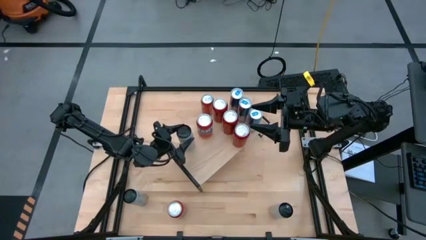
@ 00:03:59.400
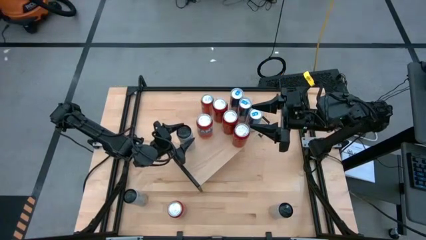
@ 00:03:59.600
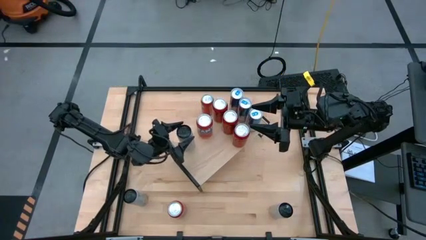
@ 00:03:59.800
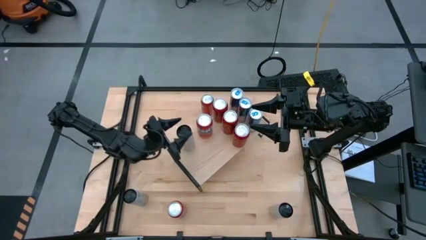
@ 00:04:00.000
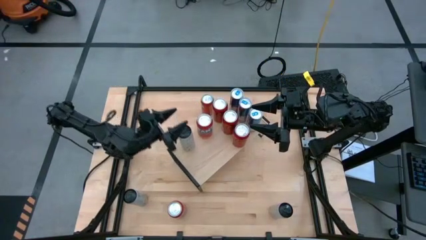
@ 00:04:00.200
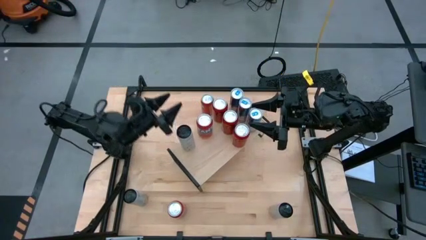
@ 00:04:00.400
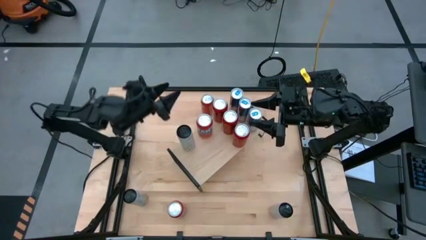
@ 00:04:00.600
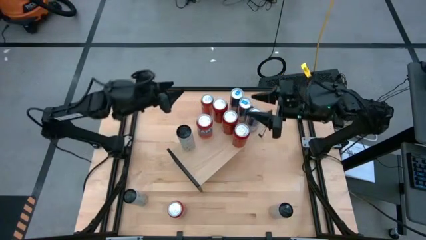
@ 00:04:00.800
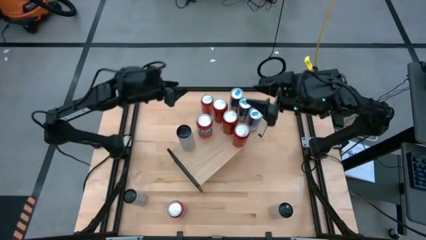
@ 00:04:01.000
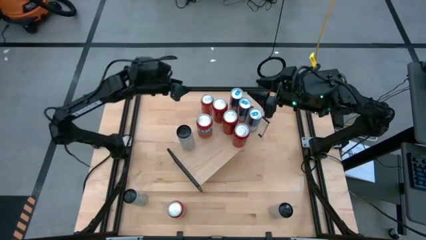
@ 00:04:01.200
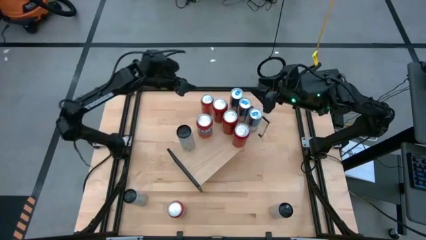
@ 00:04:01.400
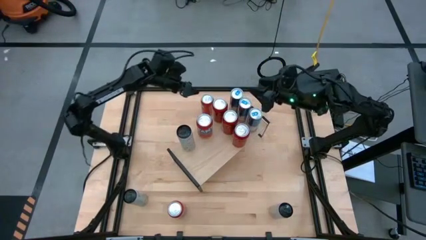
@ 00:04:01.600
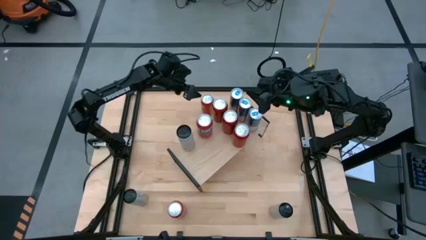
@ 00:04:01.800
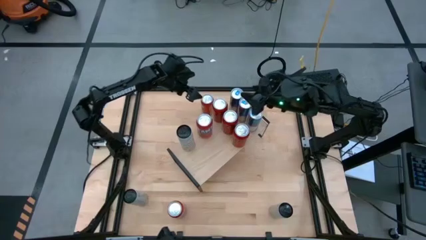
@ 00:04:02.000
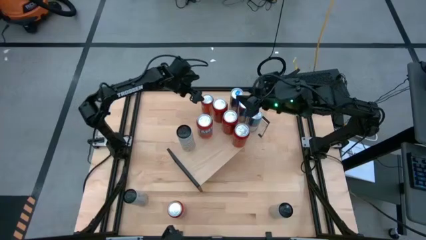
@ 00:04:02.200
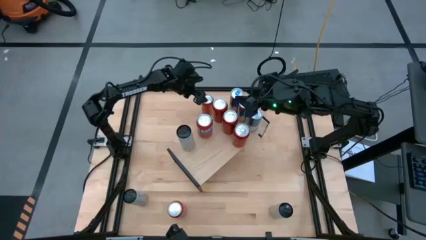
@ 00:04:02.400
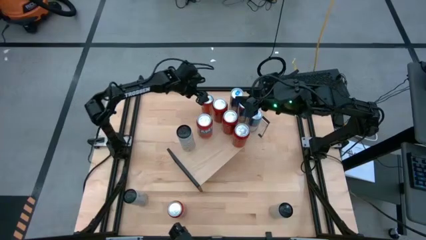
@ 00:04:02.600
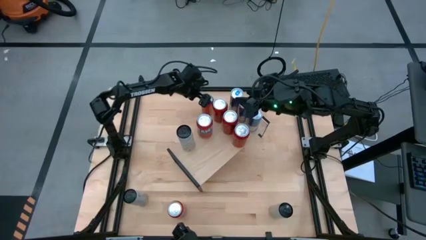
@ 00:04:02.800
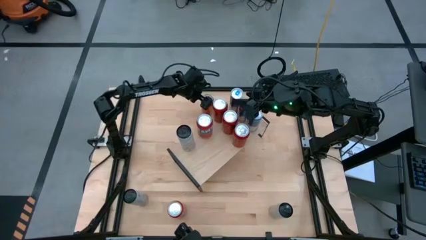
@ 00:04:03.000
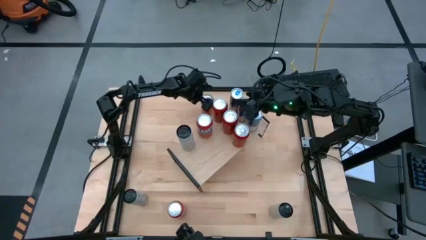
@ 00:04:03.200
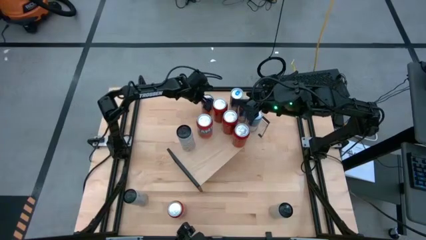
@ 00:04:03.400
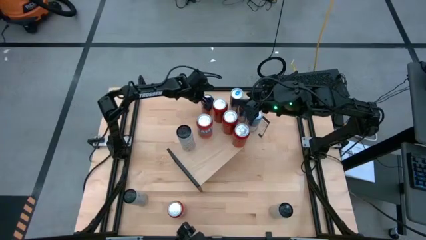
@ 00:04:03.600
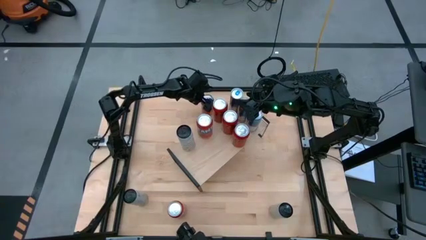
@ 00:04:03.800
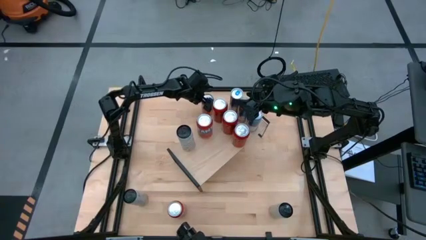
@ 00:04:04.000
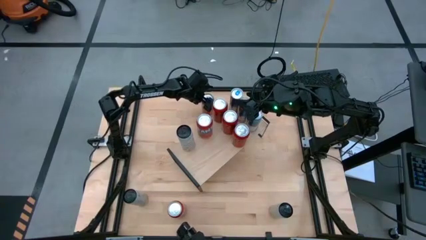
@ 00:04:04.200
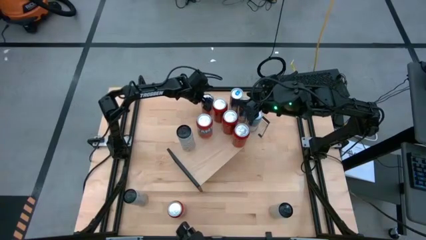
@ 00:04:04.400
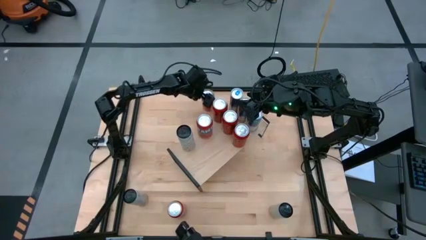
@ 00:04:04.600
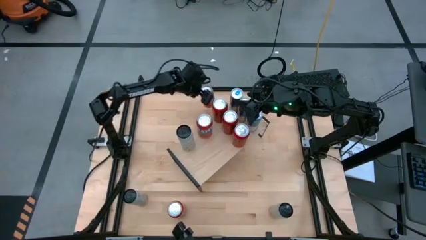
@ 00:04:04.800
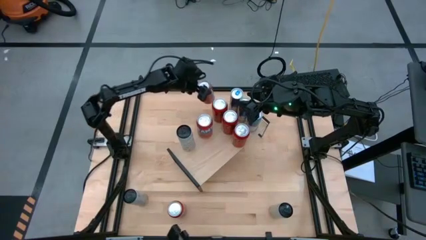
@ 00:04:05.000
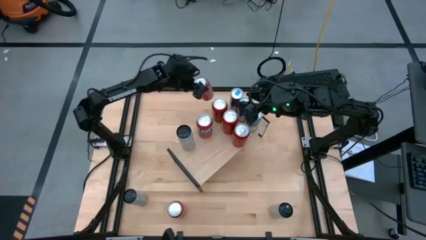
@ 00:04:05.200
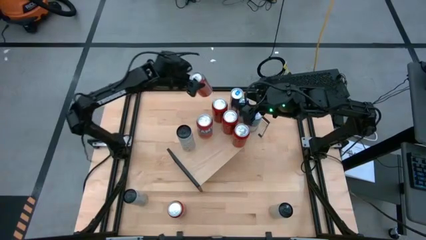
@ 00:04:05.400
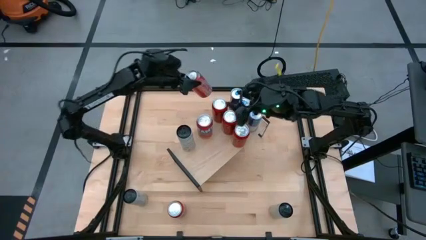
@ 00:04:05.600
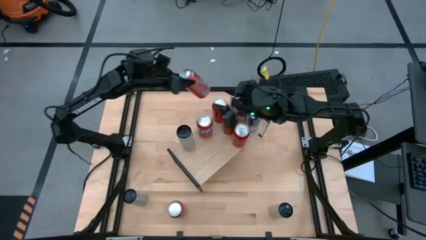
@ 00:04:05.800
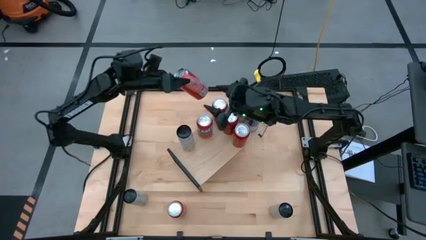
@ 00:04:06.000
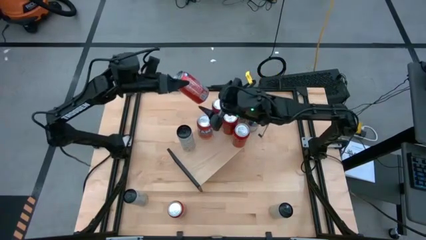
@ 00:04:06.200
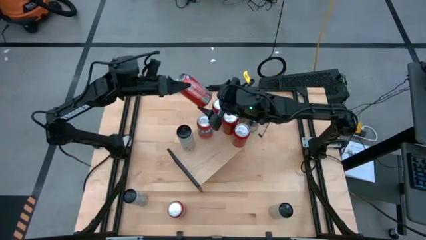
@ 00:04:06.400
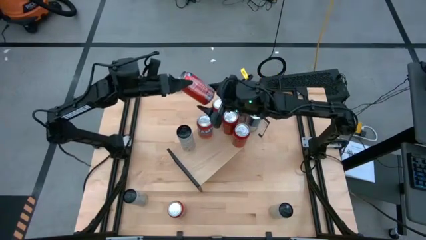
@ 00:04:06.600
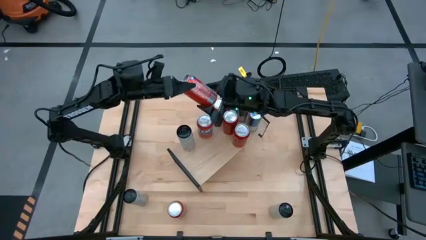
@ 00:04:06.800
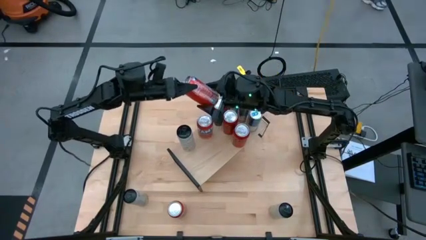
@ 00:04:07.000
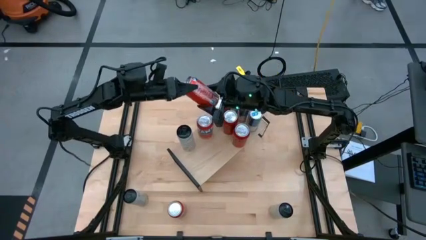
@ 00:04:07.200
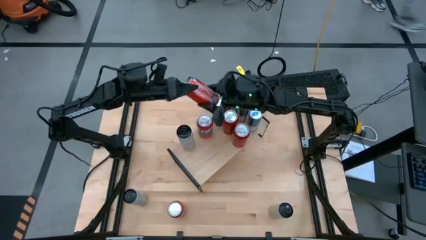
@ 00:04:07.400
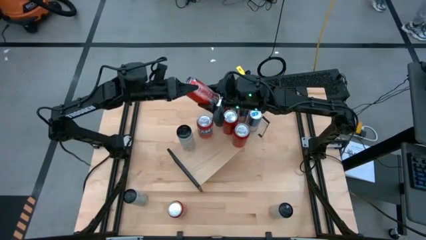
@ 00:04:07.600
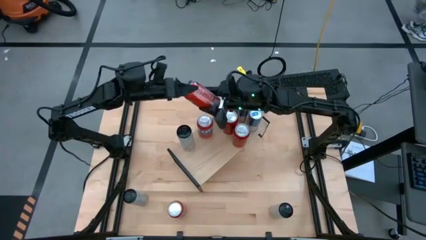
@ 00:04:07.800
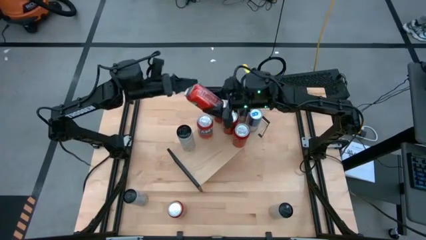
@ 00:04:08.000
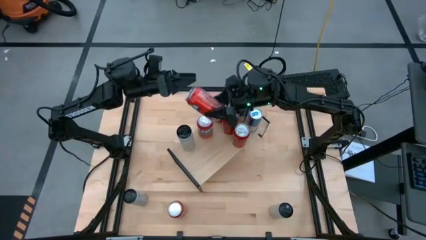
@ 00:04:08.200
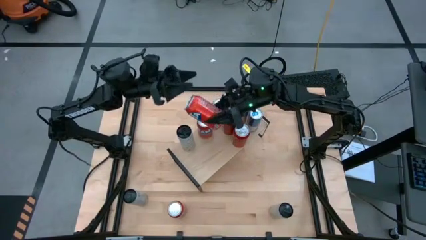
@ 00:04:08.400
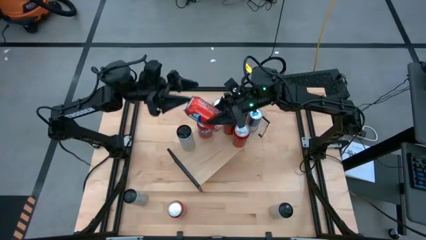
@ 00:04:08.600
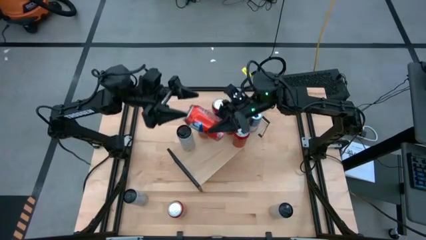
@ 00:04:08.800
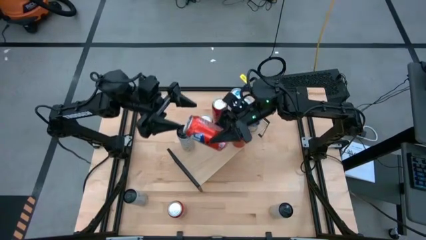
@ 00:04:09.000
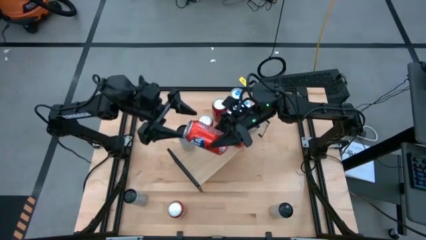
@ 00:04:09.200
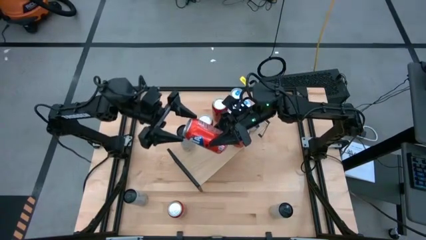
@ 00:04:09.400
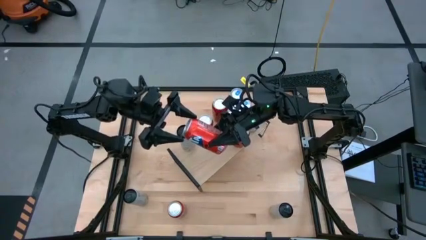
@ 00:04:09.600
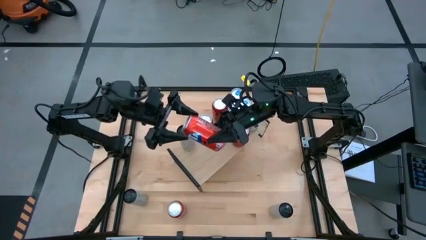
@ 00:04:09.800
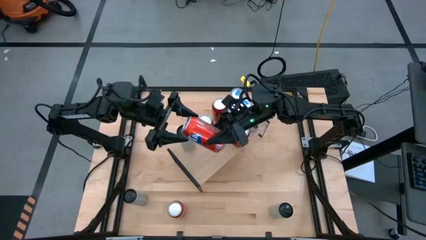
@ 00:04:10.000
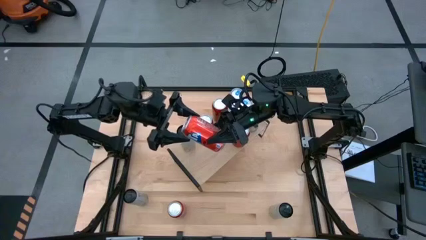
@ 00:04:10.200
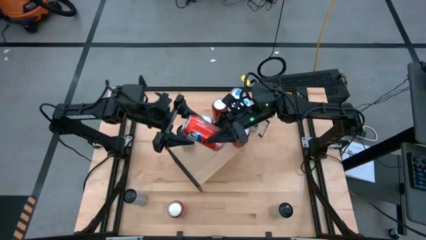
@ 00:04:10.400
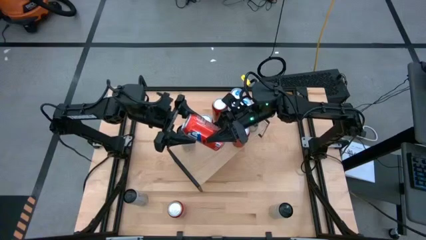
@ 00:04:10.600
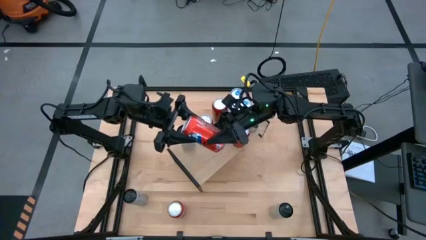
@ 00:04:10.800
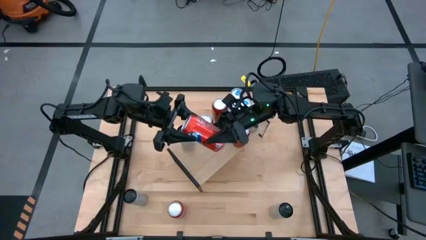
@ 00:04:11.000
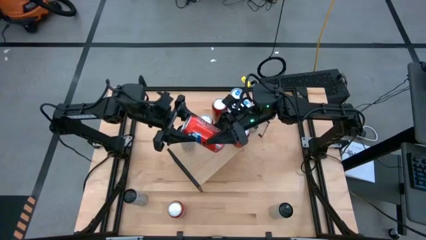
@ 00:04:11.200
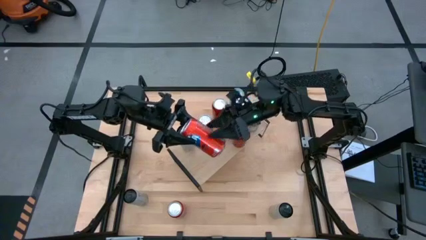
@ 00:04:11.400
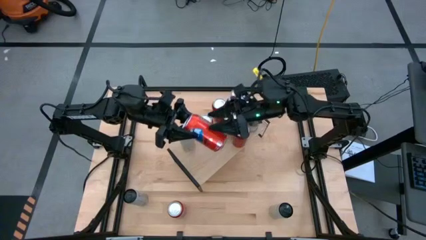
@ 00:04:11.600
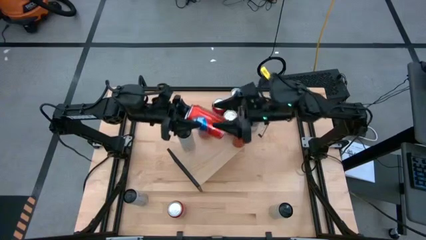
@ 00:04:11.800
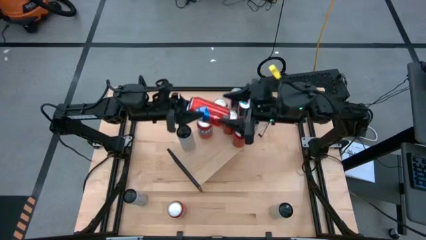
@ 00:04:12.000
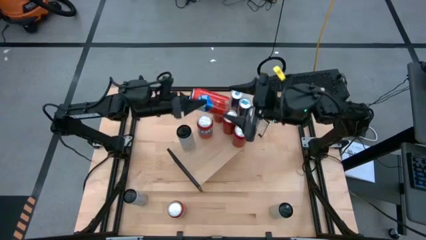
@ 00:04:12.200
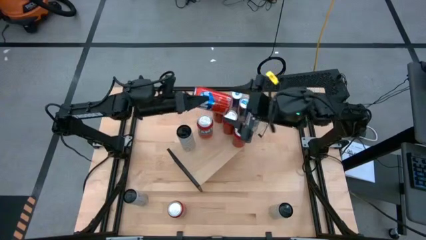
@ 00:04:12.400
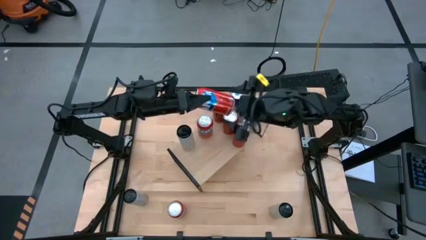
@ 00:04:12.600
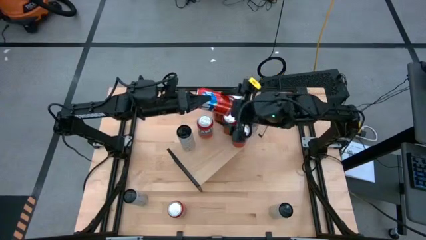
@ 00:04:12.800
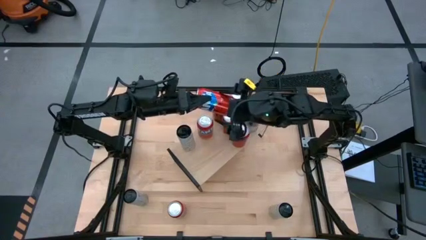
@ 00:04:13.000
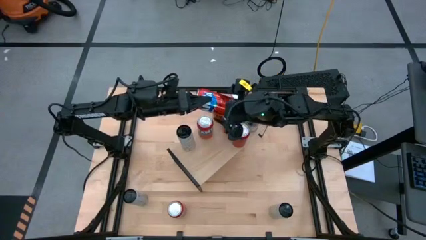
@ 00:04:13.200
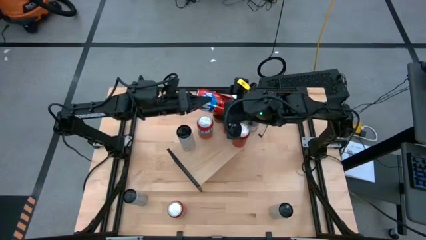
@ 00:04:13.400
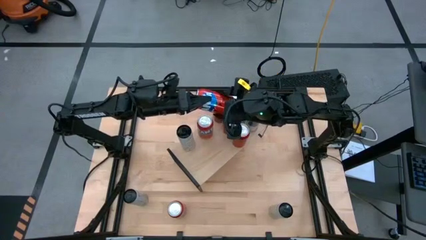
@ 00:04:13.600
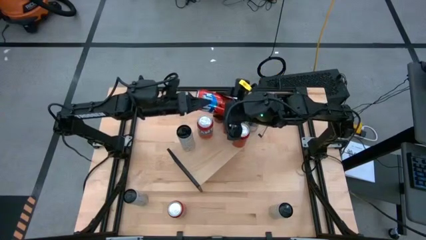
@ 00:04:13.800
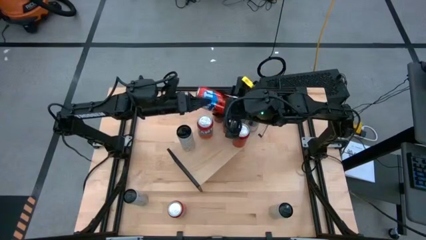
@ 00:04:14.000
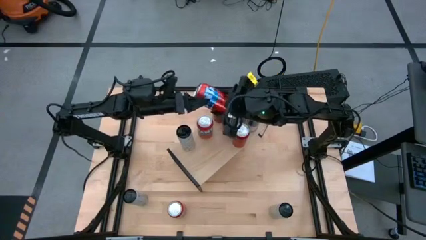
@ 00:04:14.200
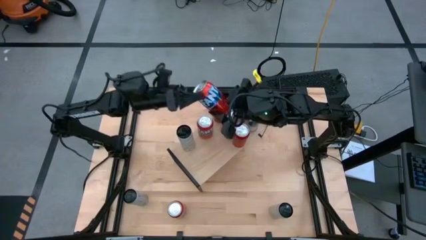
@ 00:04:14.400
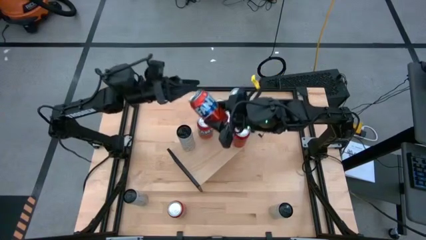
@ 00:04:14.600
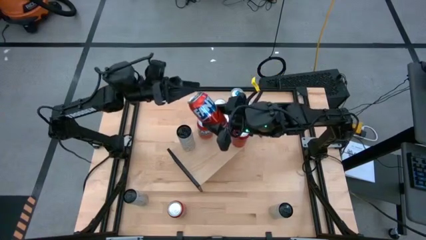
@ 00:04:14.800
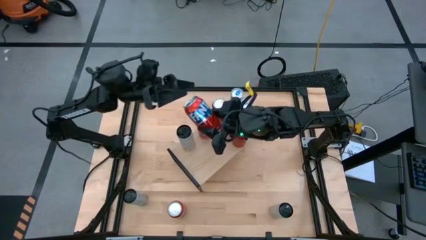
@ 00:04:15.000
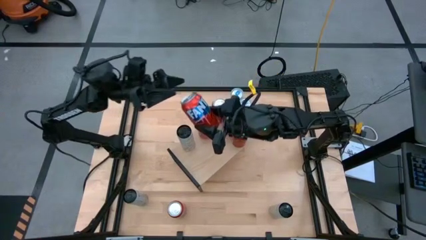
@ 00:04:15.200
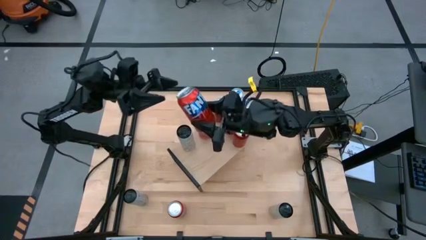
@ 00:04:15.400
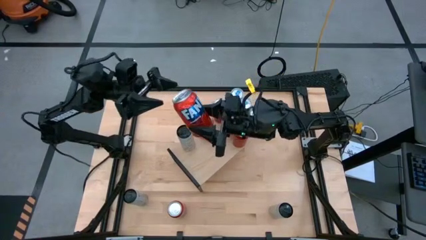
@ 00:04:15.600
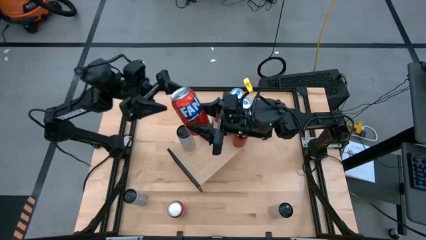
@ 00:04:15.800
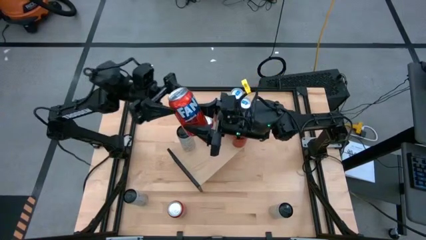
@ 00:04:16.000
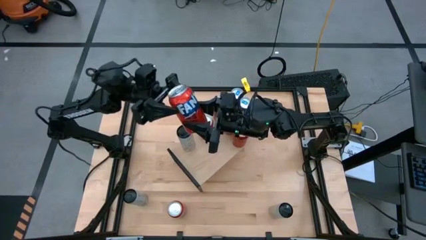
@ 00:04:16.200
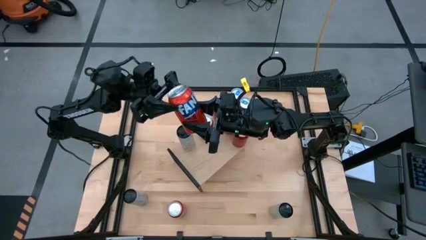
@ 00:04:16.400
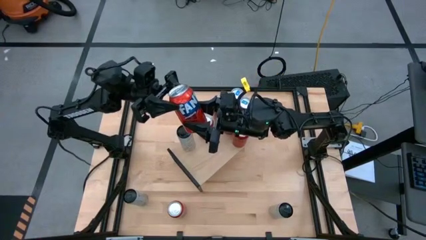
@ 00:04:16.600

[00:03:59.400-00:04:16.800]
Task: Place canned beverage on shelf
Put the top orange soda can on the shelf
